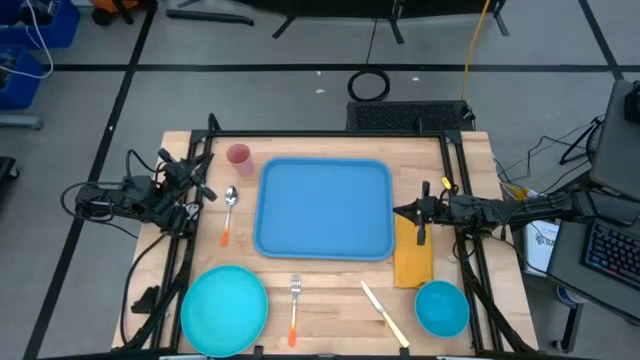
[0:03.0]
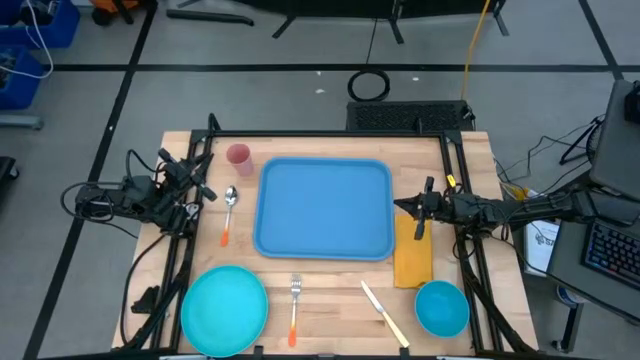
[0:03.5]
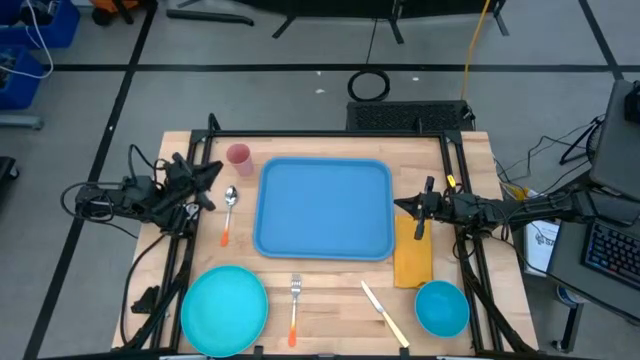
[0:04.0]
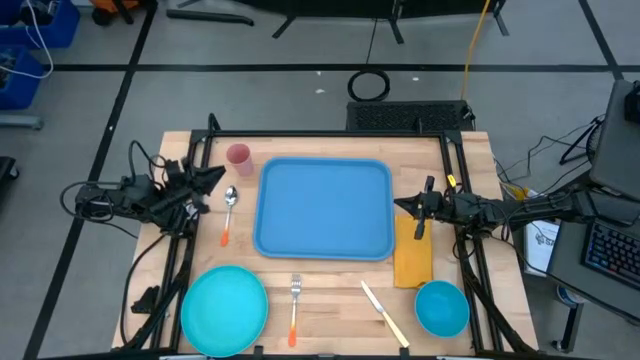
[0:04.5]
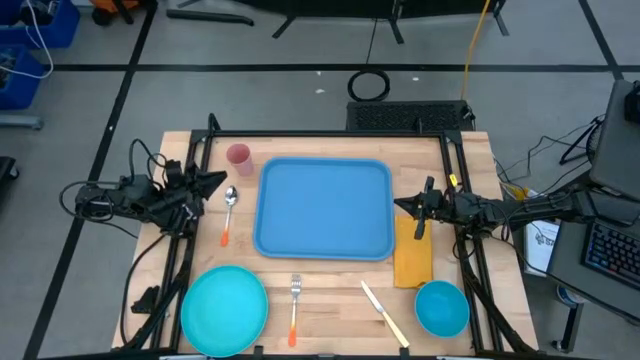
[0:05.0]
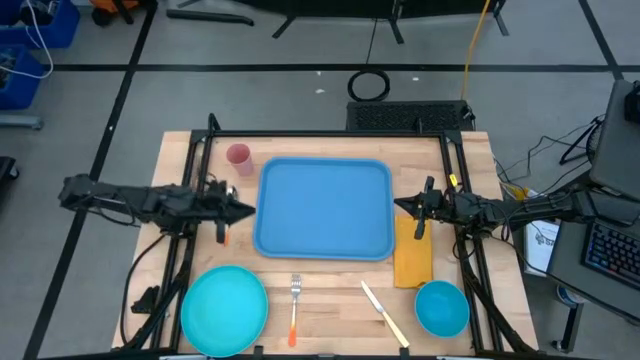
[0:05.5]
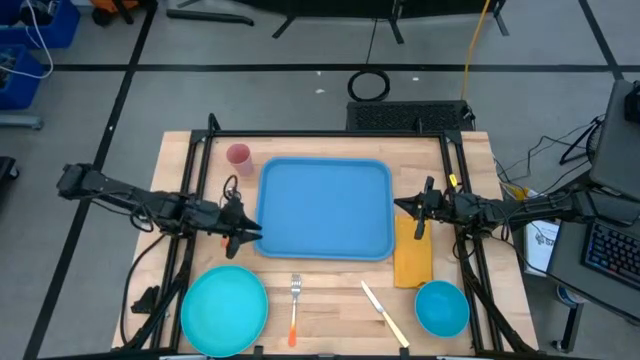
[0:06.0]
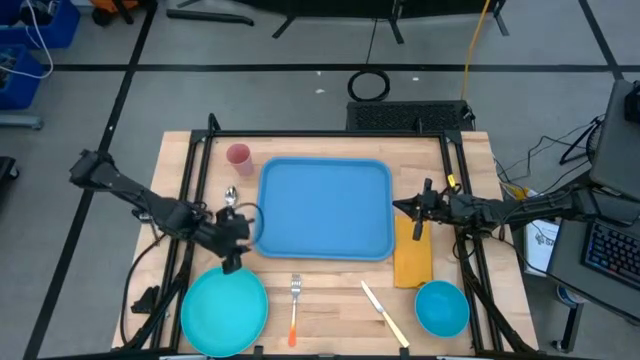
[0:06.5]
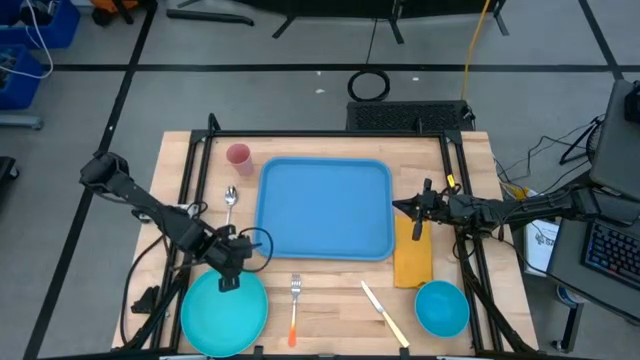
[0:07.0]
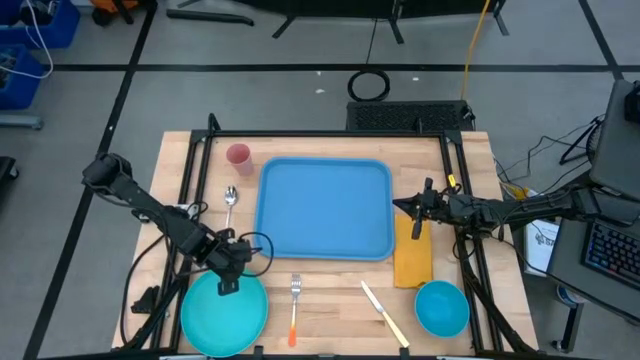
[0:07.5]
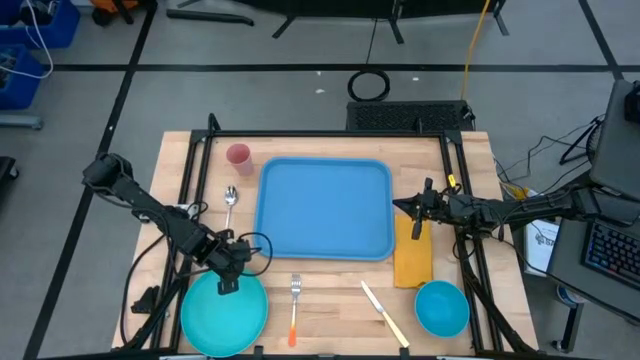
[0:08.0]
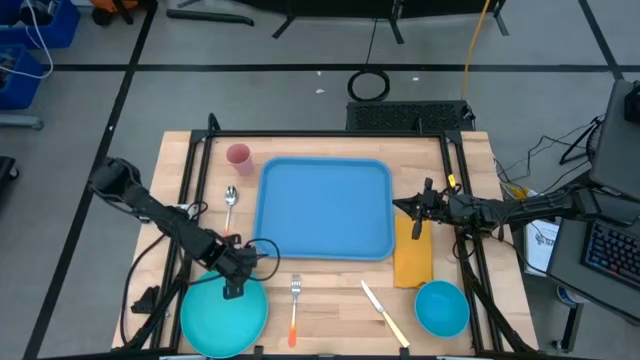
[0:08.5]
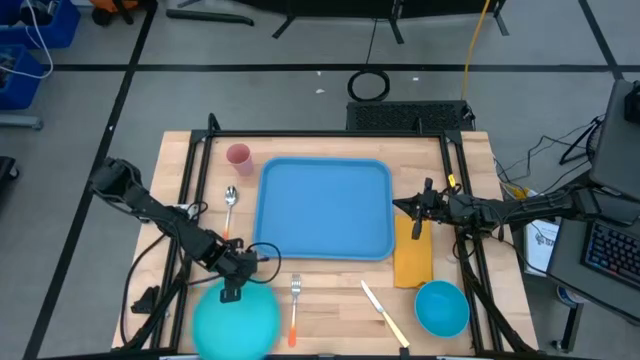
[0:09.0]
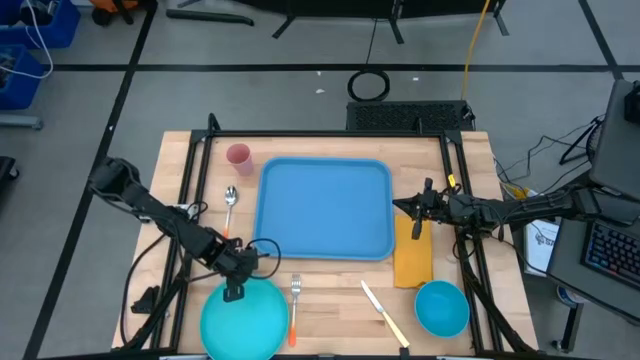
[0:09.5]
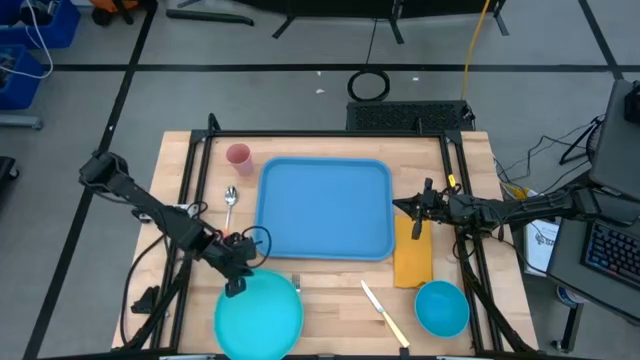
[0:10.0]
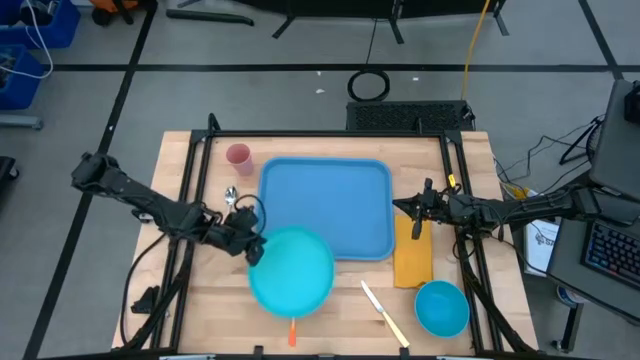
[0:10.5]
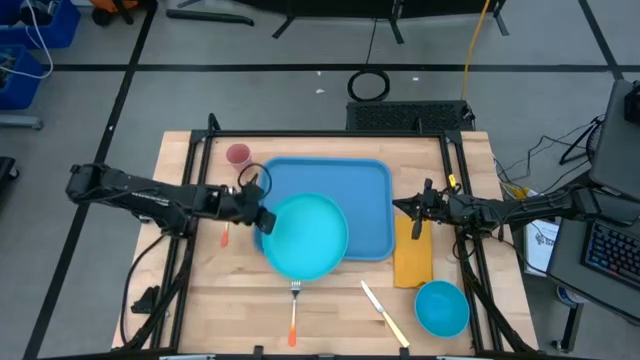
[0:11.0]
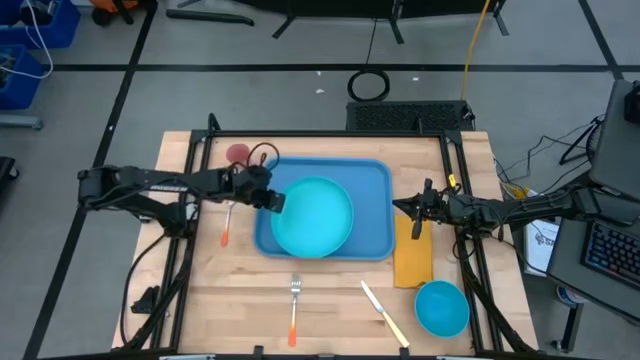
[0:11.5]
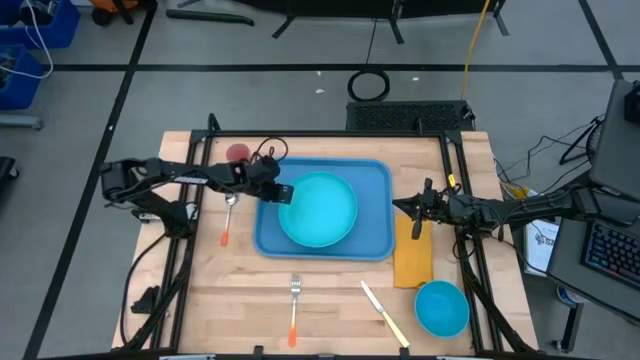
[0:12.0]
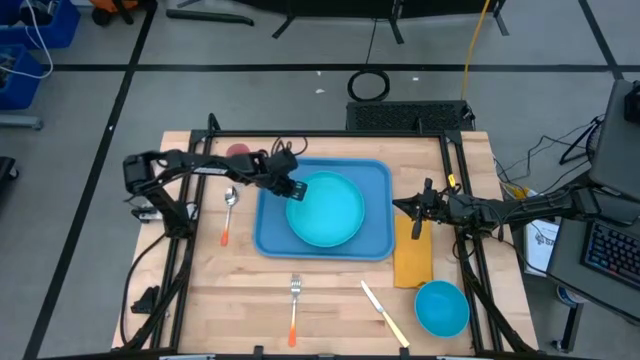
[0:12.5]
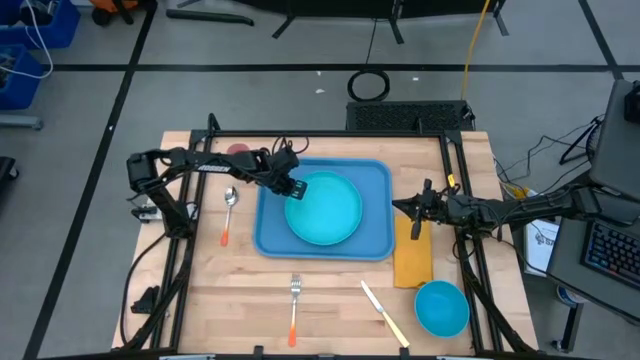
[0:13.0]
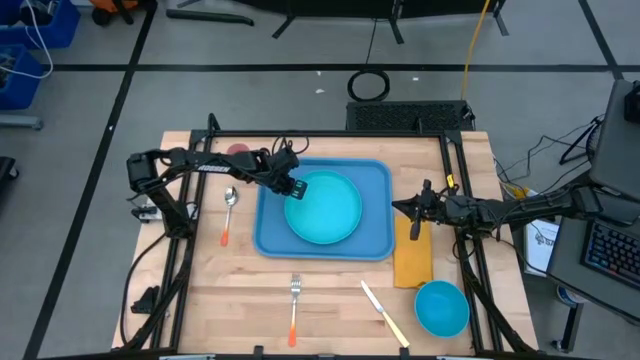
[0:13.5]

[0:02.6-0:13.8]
Task: Set up tray
Put the green plate on the blue serving tray

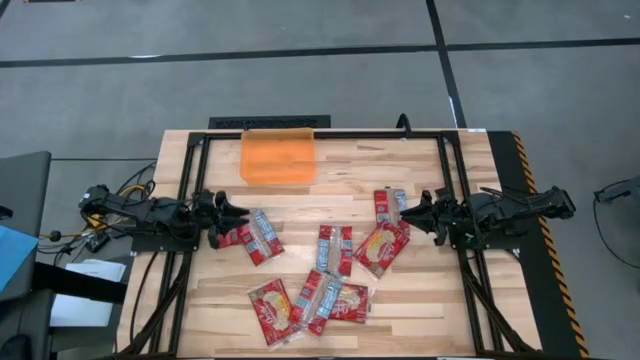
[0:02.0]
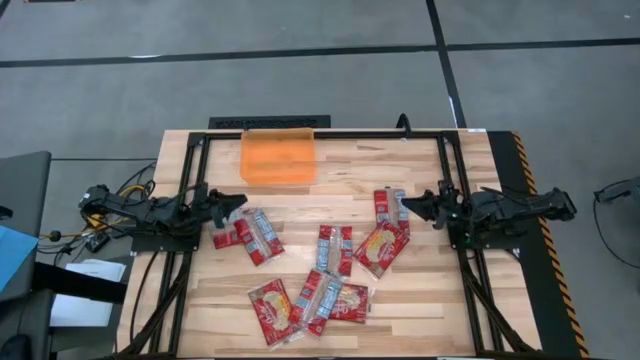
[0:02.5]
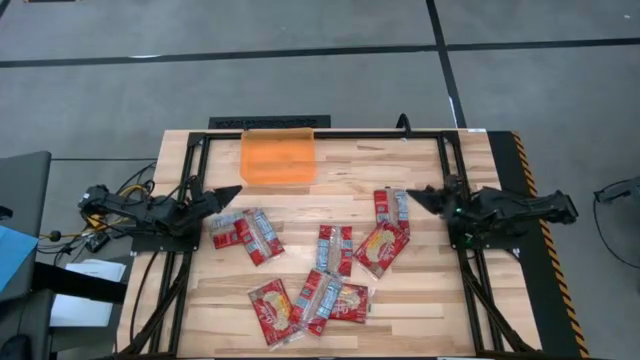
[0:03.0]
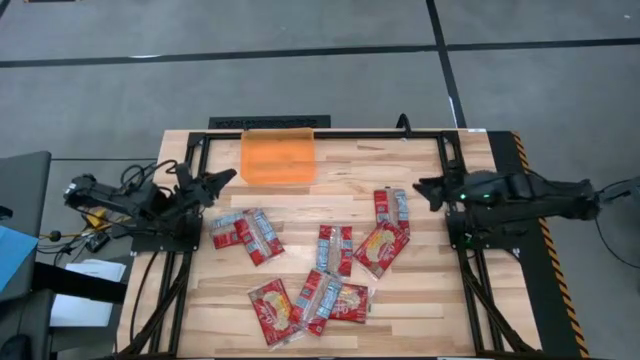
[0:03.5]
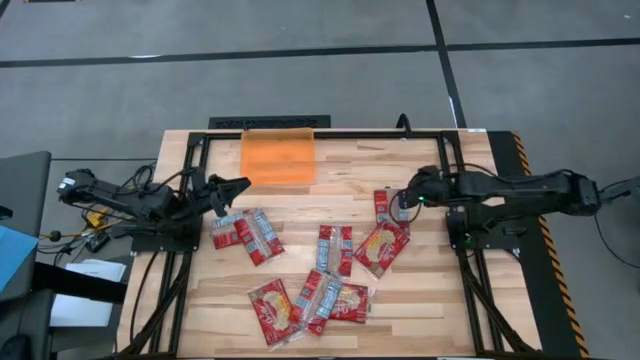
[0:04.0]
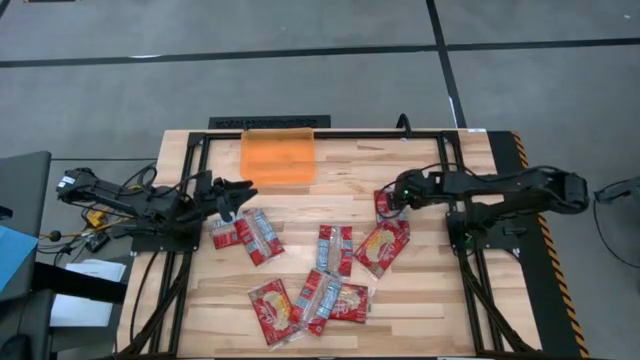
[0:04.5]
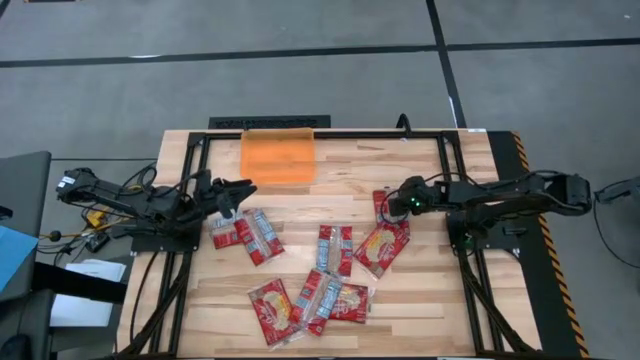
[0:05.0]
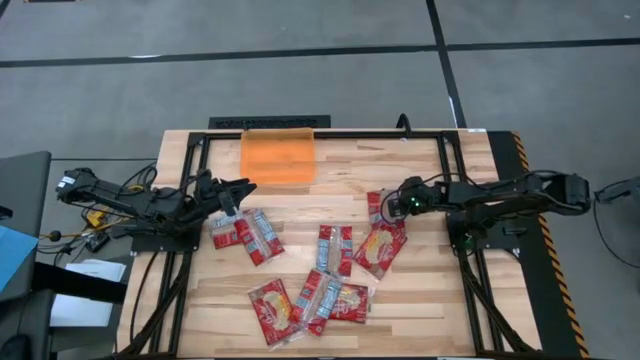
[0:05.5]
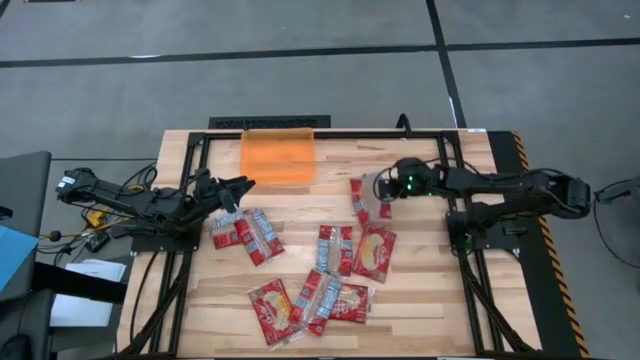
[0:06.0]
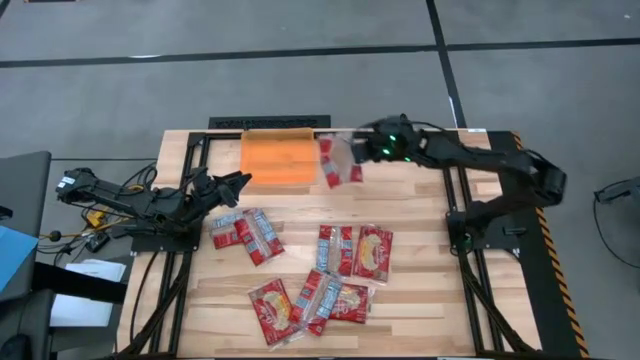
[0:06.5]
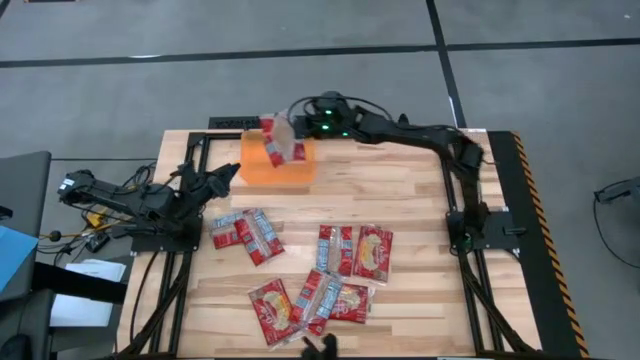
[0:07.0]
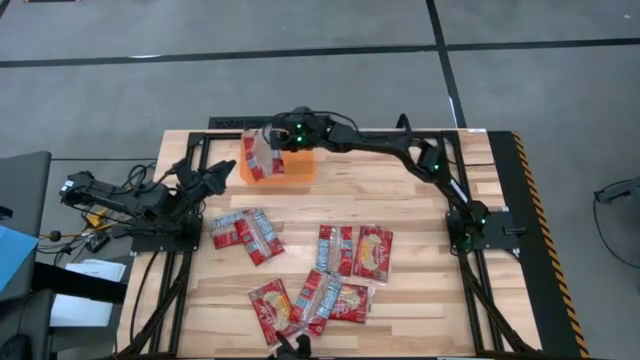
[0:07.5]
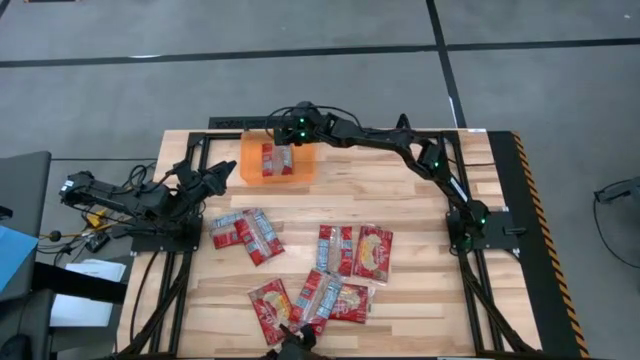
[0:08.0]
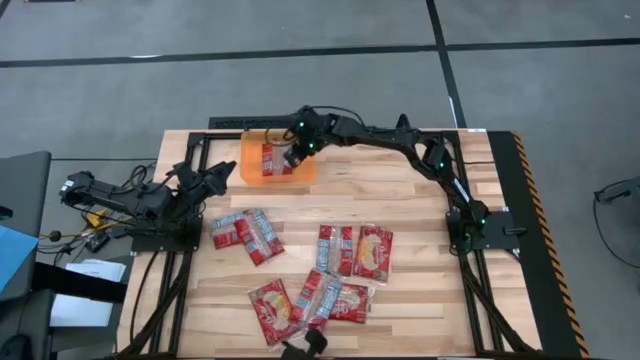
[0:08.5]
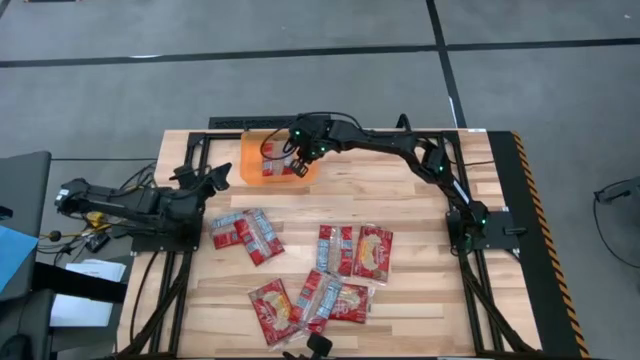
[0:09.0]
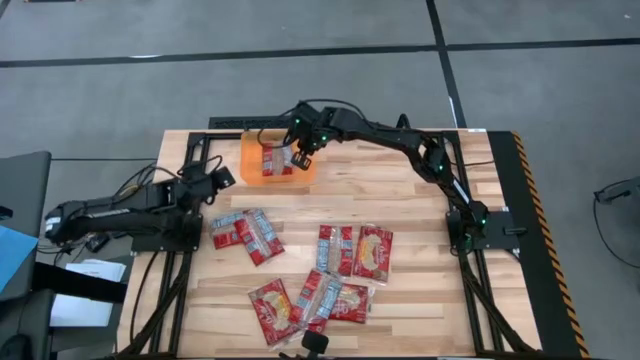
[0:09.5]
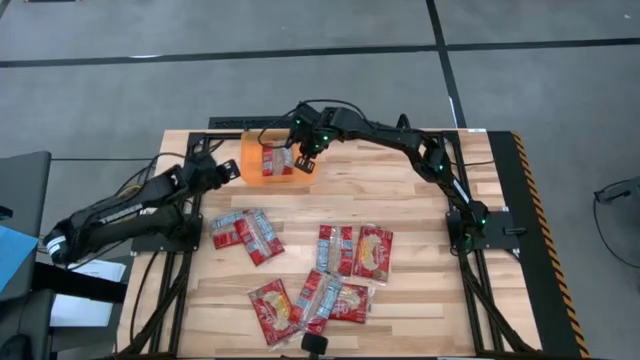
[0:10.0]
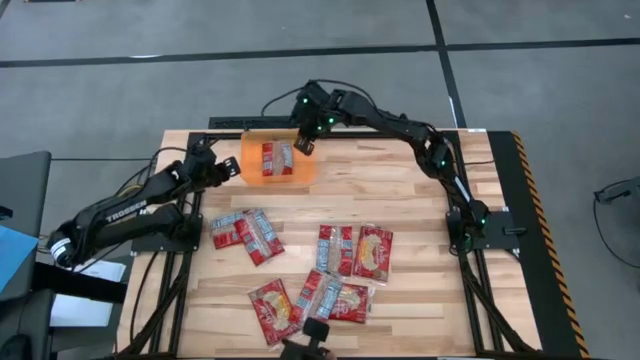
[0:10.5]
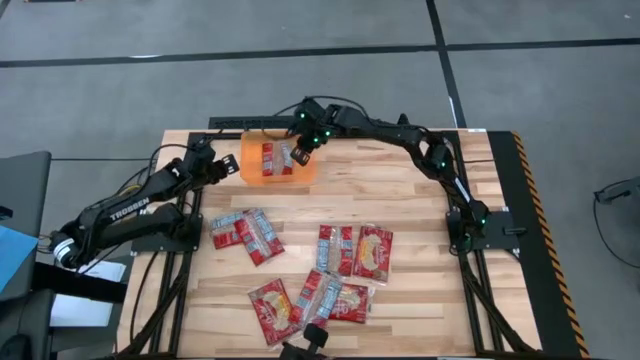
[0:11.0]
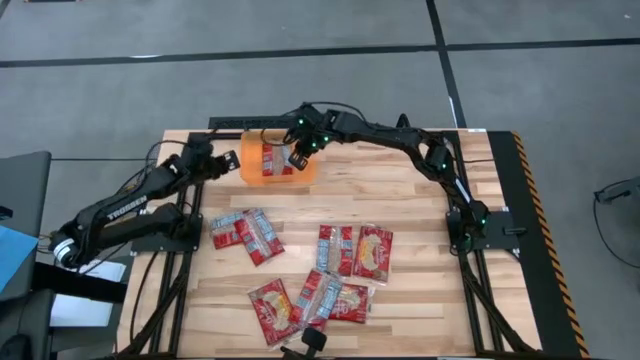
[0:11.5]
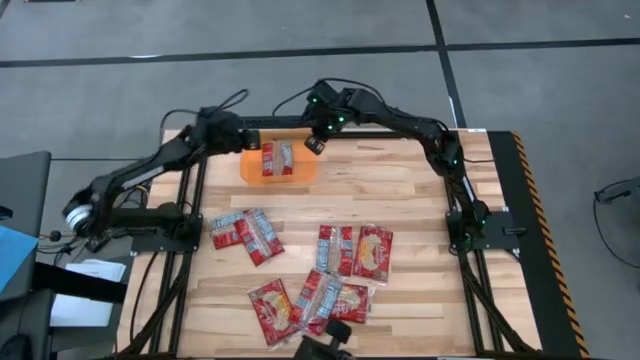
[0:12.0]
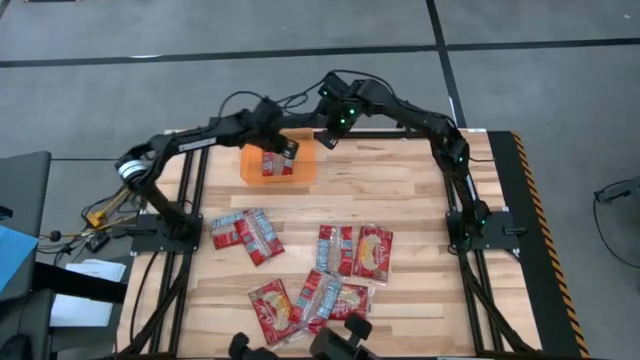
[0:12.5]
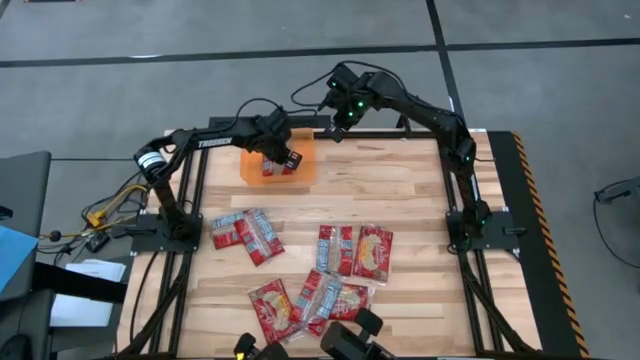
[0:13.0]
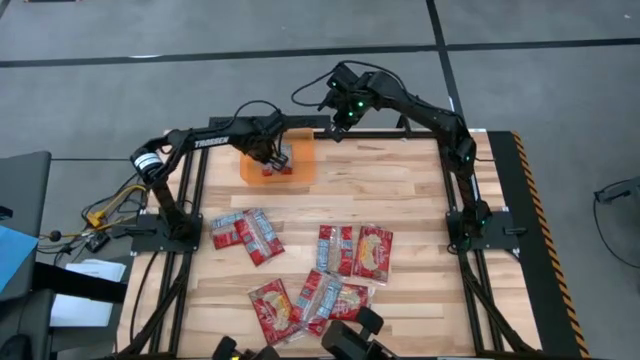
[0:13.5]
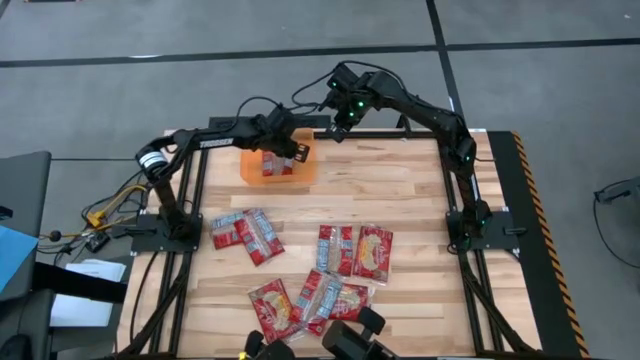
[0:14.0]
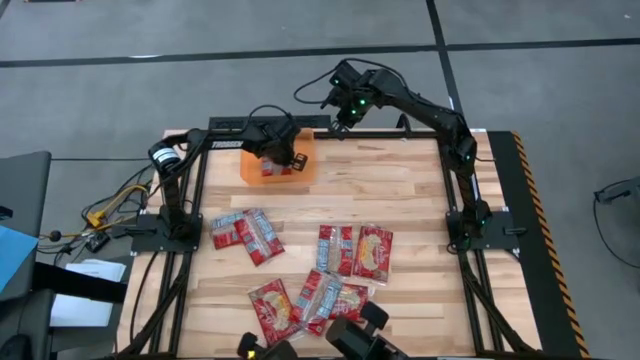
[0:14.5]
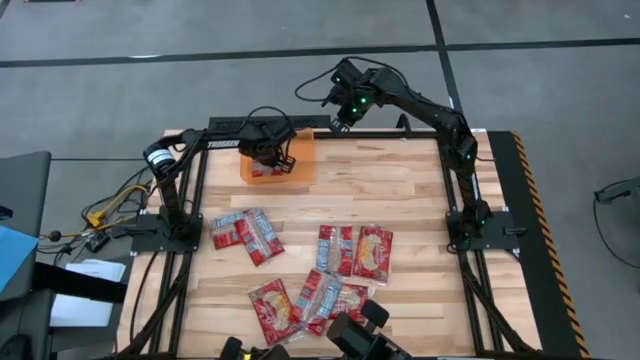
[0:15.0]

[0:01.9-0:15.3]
Task: Sort popcorn bags into baskets
Put the popcorn bag into the orange bin
